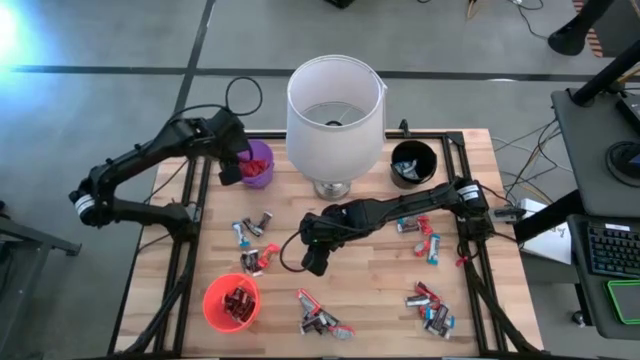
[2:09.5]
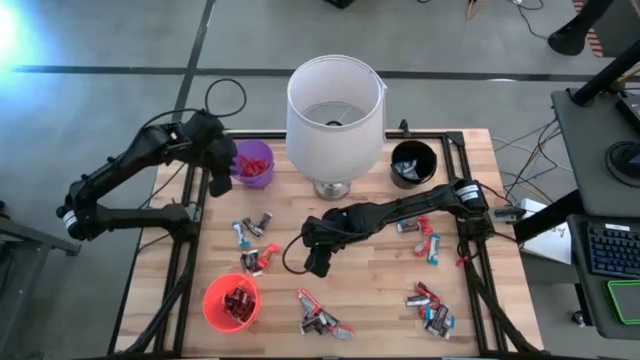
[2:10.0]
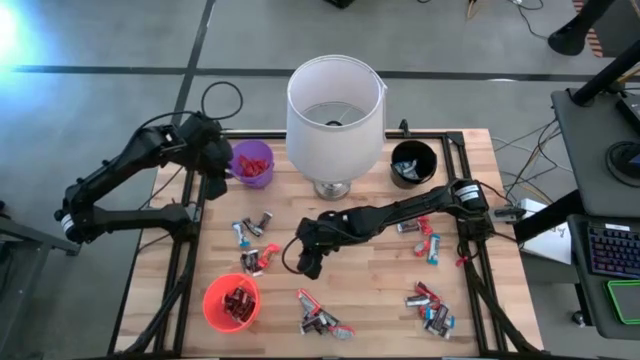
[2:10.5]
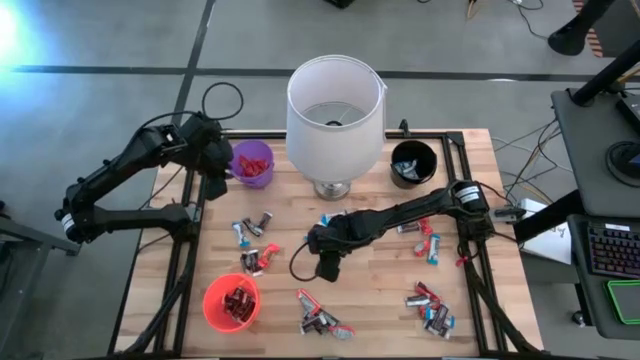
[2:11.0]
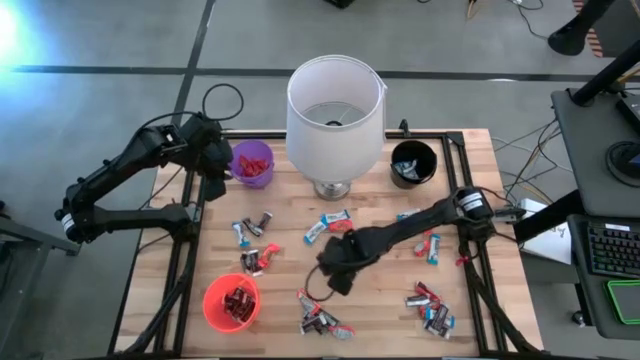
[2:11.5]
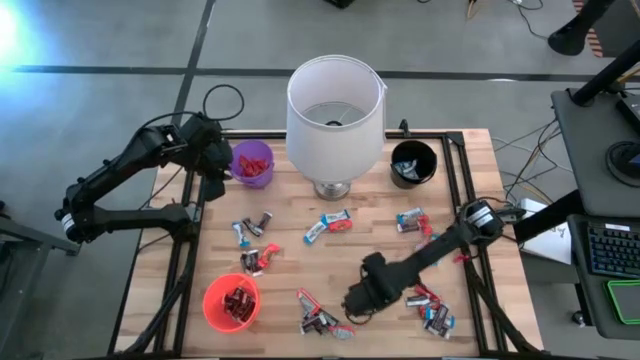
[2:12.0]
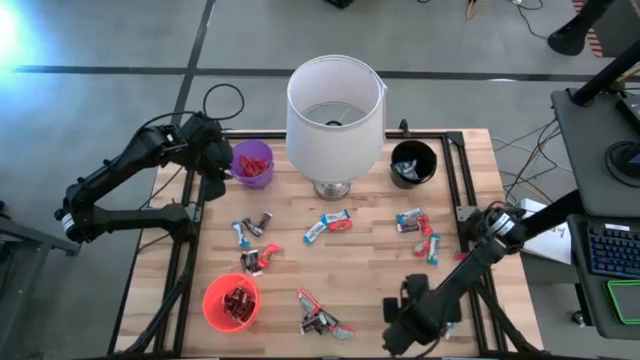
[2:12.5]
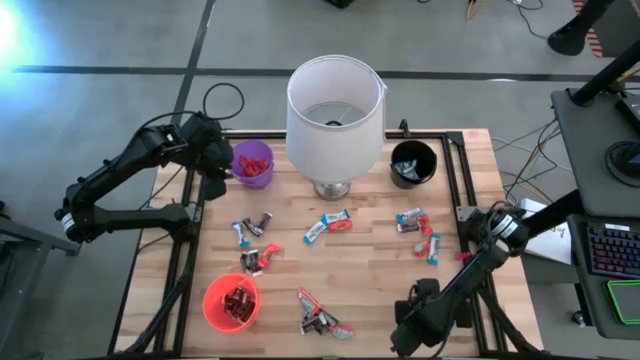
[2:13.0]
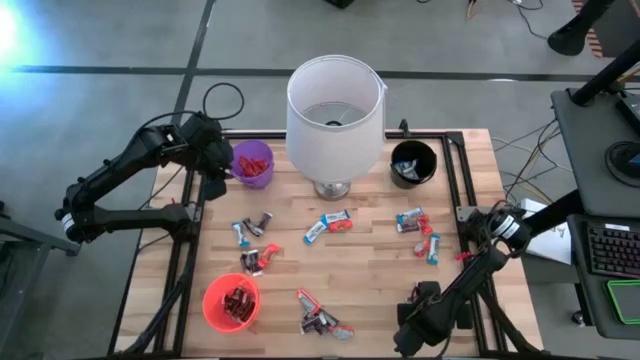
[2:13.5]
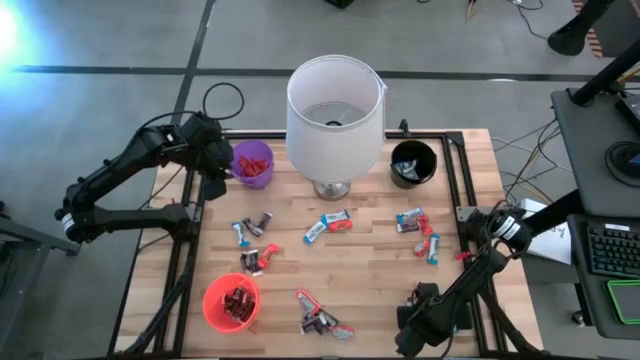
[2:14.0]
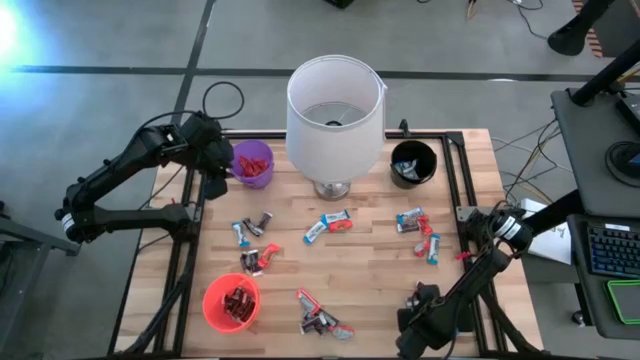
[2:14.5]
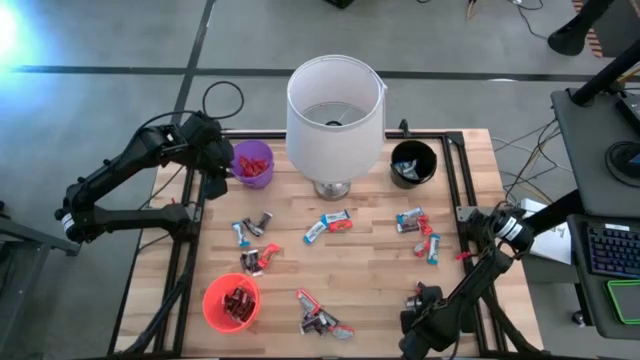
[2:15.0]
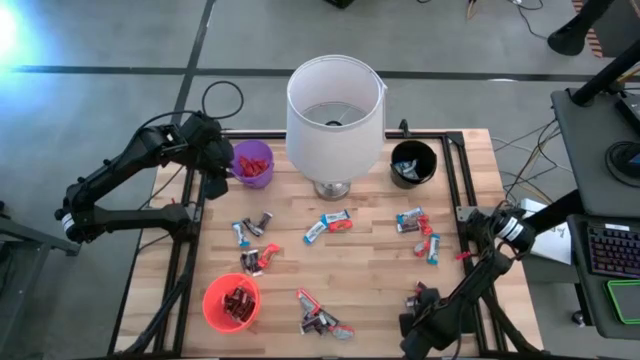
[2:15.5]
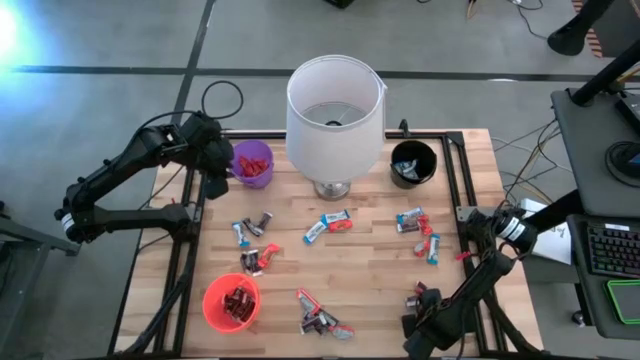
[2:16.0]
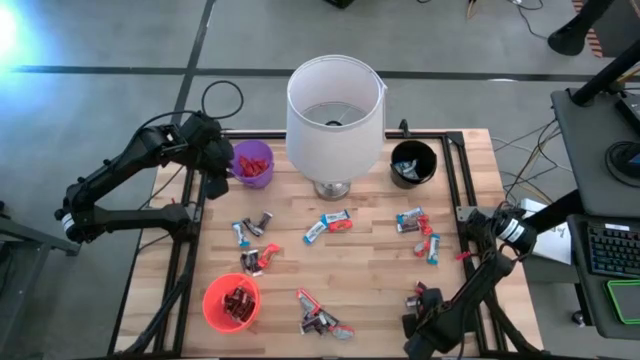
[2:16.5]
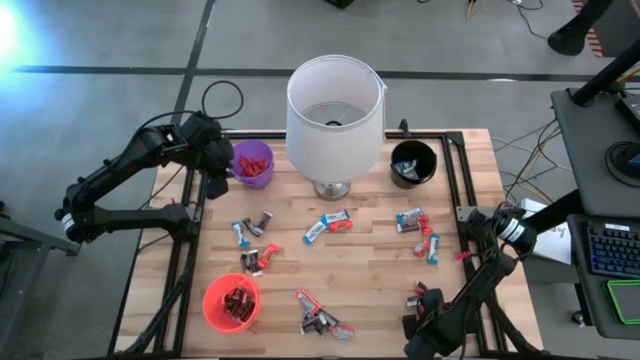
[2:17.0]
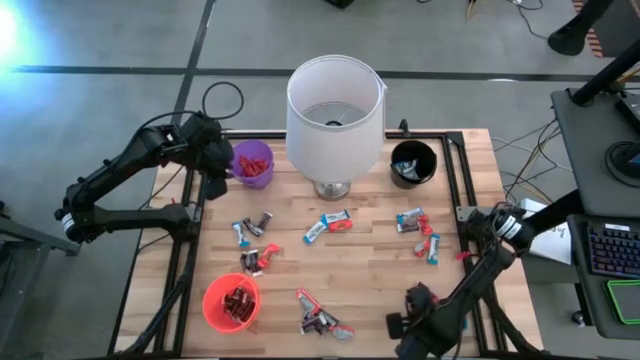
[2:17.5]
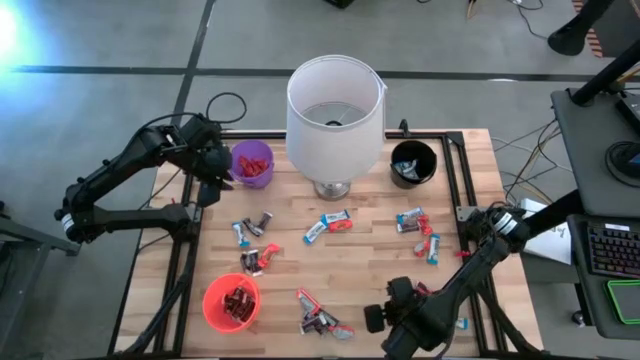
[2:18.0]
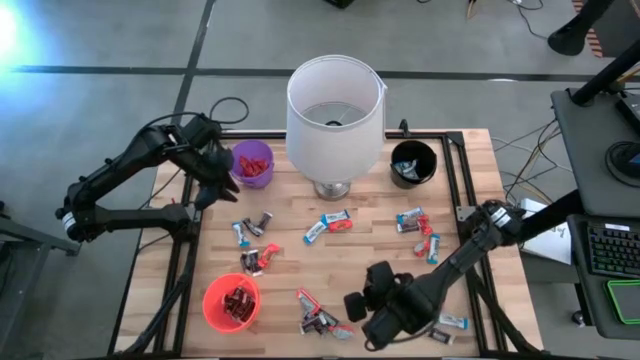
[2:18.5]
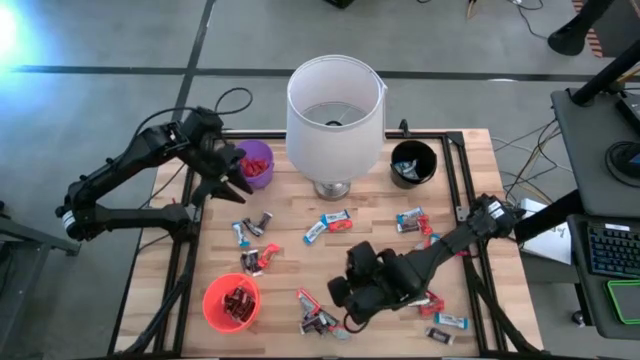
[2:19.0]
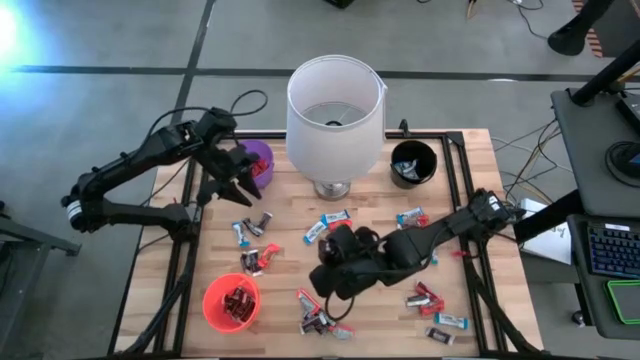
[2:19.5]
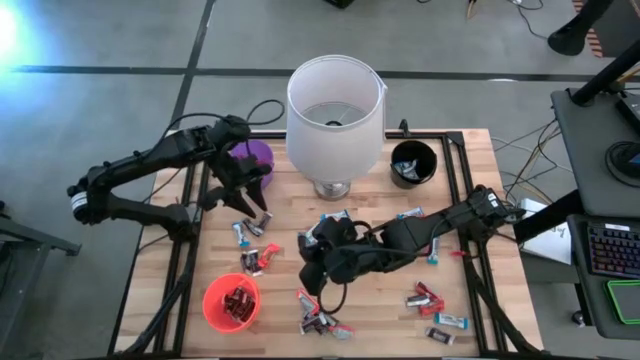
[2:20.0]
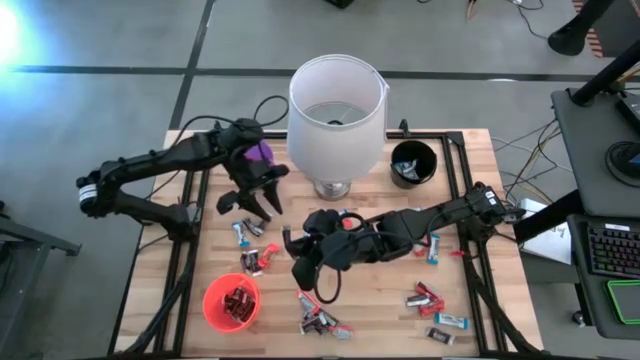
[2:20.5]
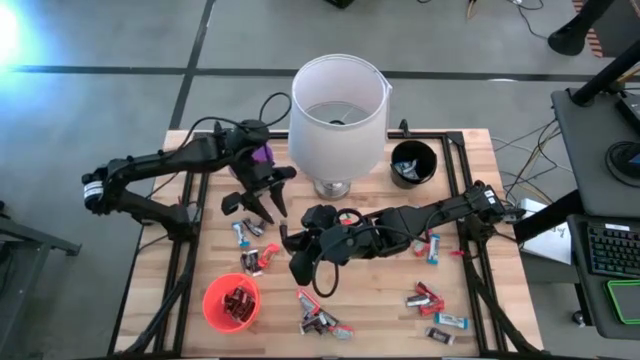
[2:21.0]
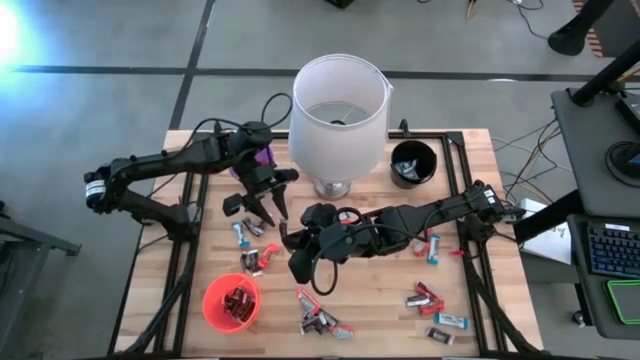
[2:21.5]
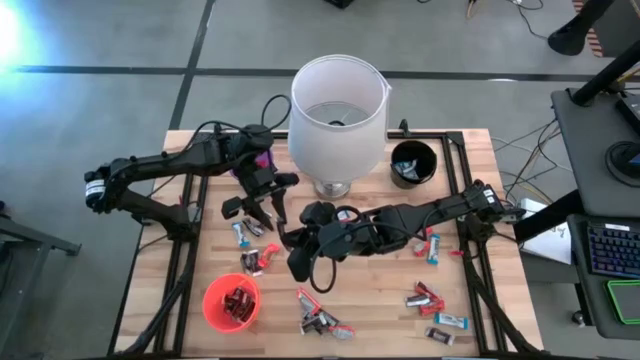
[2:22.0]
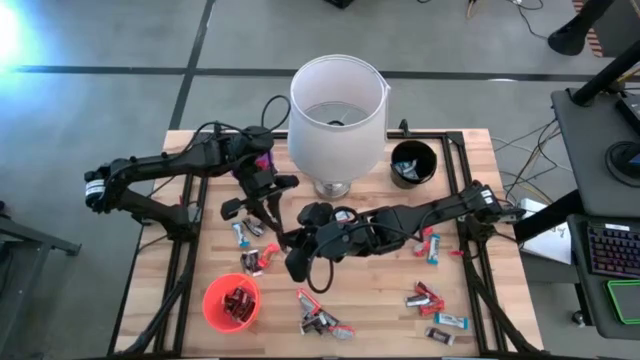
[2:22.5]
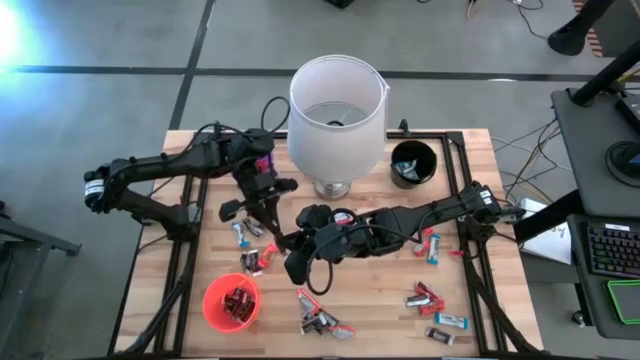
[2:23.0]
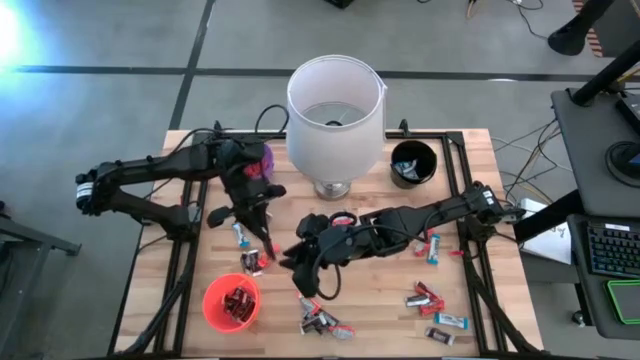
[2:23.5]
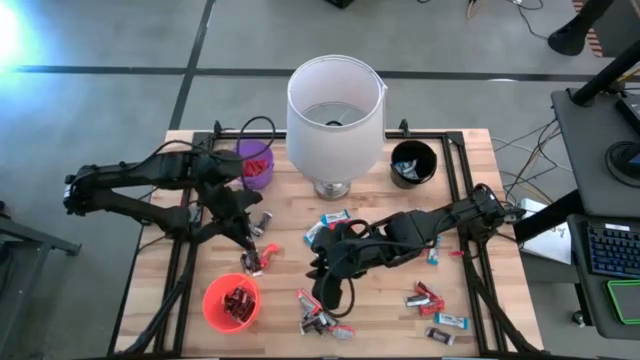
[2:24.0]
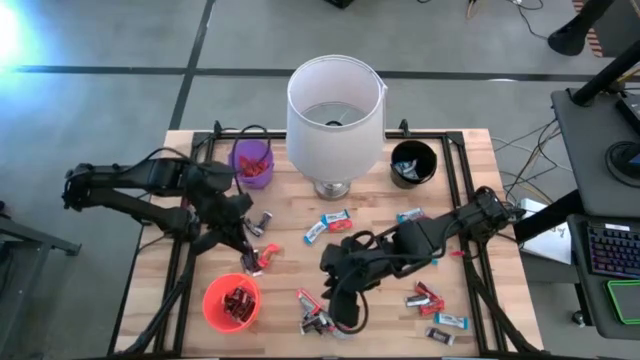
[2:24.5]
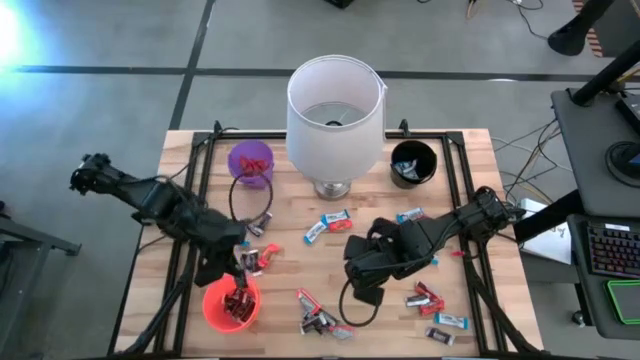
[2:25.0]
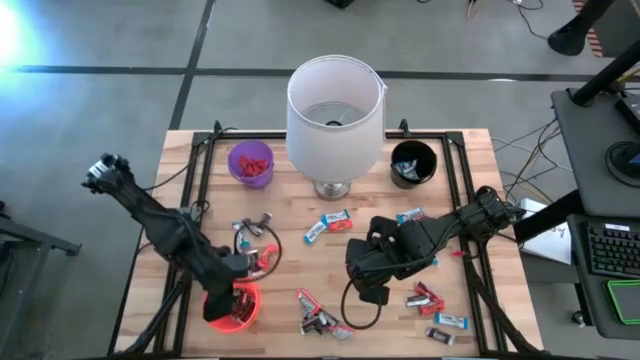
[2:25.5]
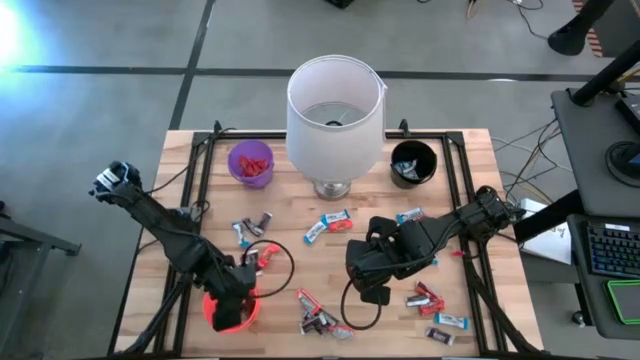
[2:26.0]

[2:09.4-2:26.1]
Task: Sort candy
Put the black chocolate into the orange bucket

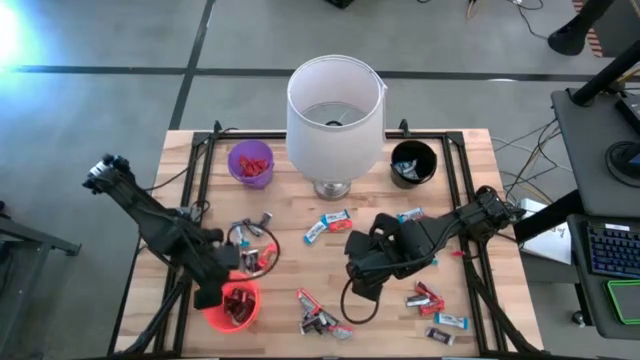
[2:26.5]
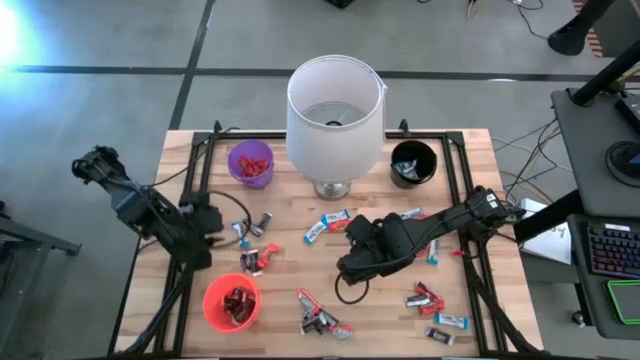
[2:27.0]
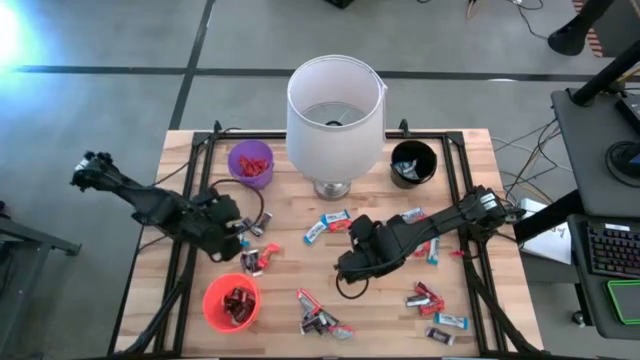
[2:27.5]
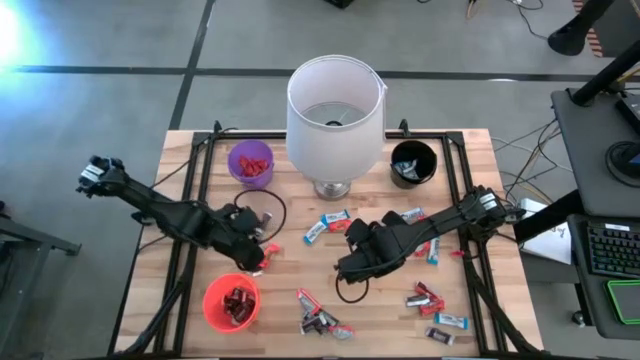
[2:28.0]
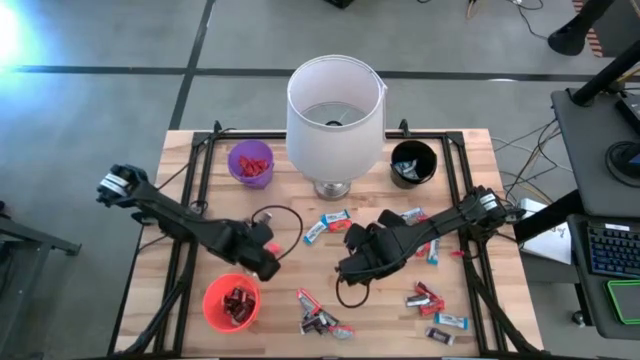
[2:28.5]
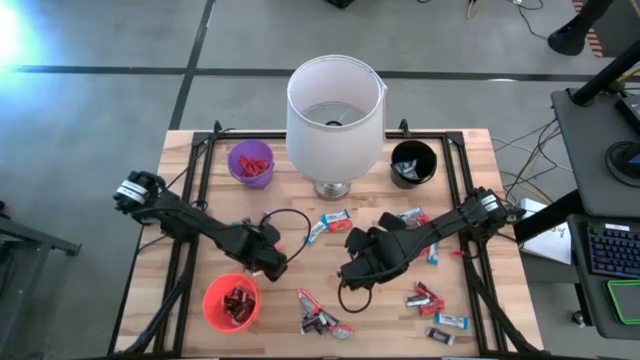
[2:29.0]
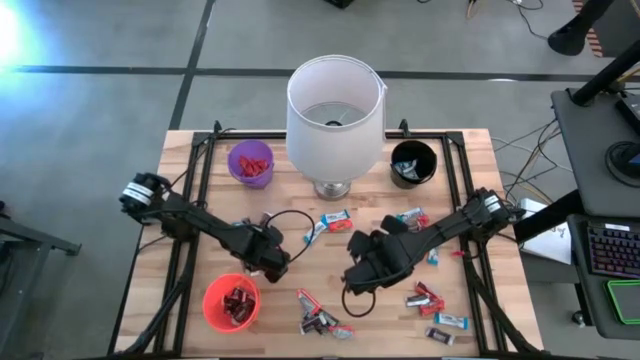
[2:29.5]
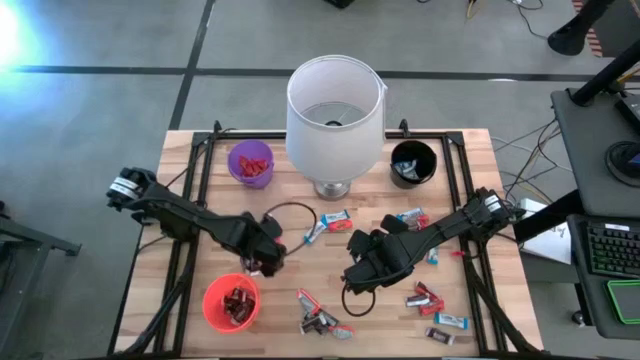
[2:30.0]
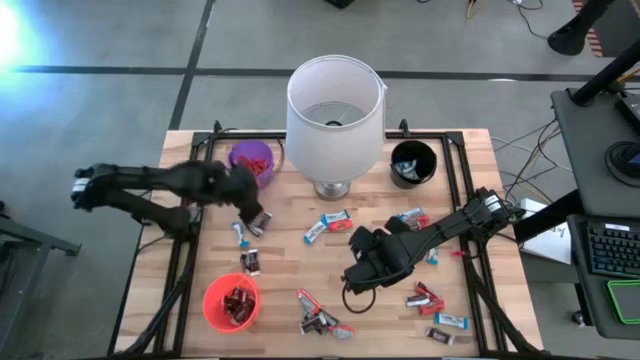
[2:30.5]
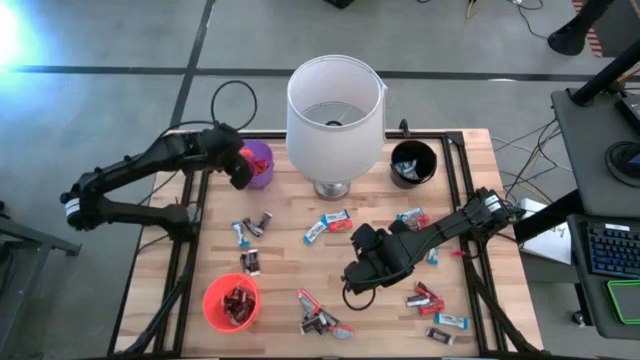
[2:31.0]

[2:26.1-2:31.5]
Put the orange chocolate into the purple bucket
